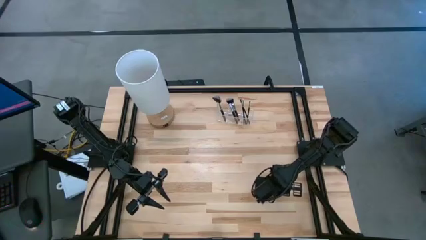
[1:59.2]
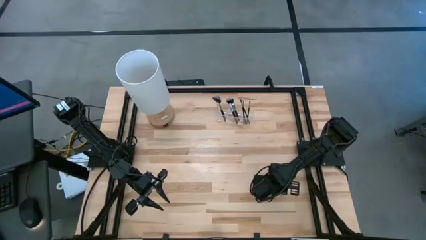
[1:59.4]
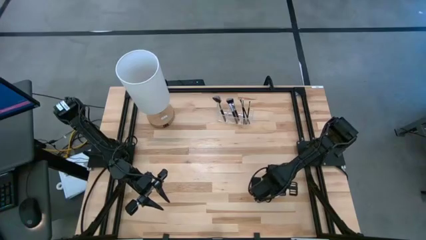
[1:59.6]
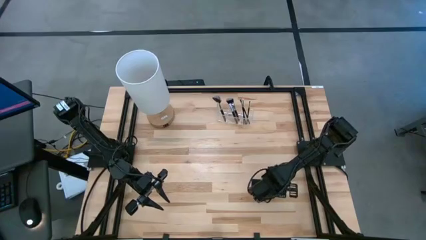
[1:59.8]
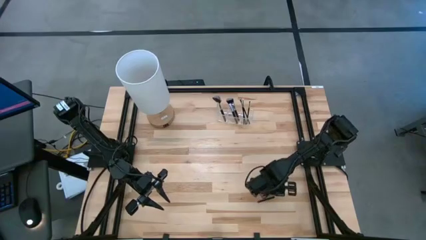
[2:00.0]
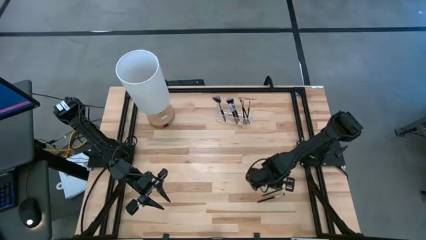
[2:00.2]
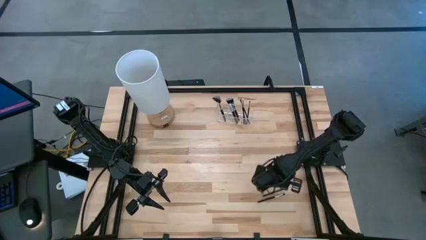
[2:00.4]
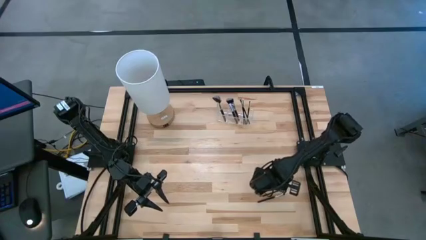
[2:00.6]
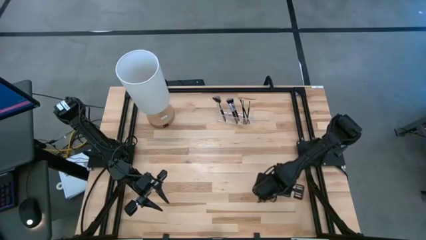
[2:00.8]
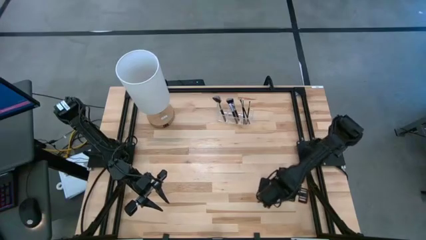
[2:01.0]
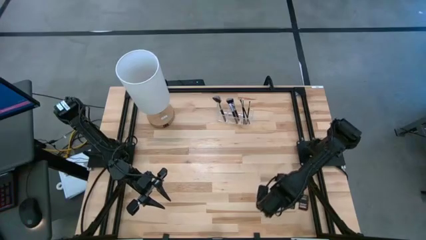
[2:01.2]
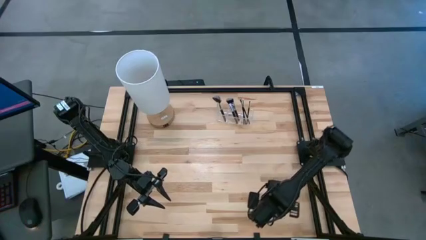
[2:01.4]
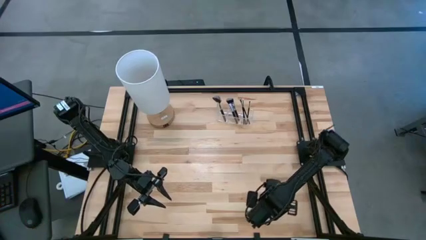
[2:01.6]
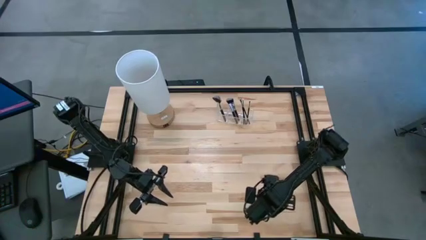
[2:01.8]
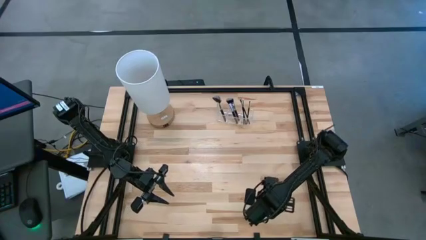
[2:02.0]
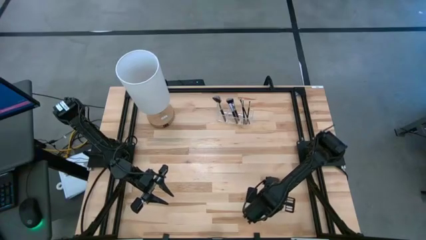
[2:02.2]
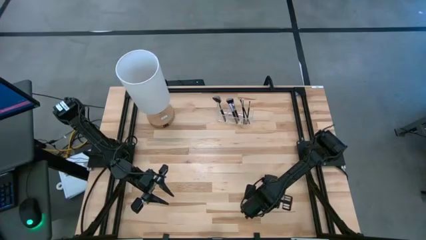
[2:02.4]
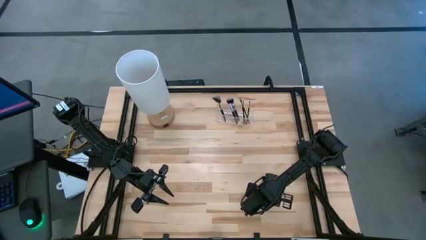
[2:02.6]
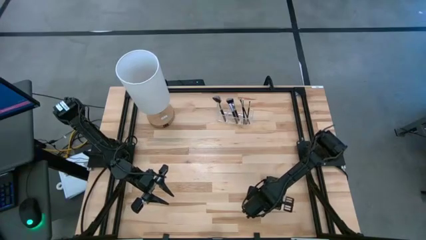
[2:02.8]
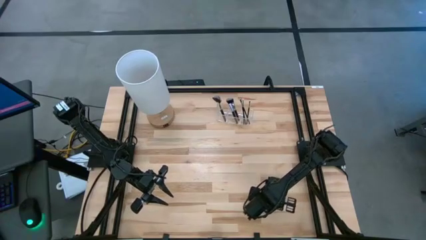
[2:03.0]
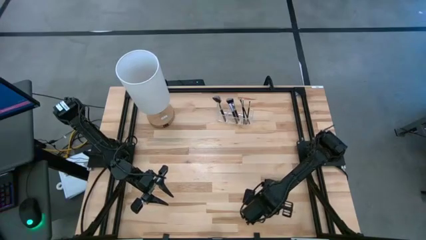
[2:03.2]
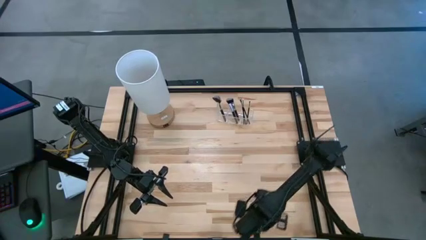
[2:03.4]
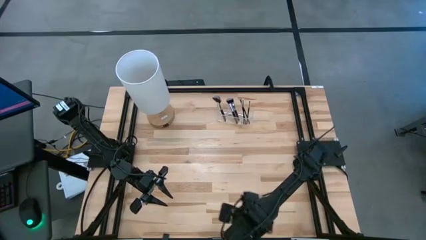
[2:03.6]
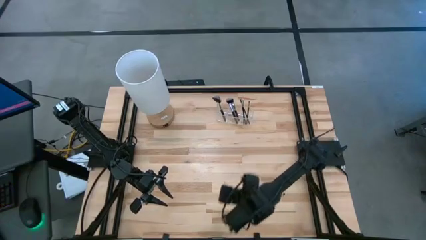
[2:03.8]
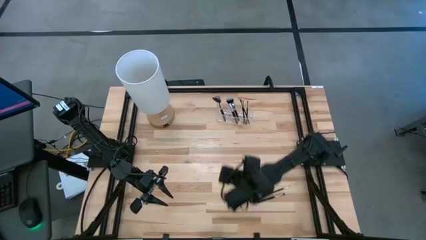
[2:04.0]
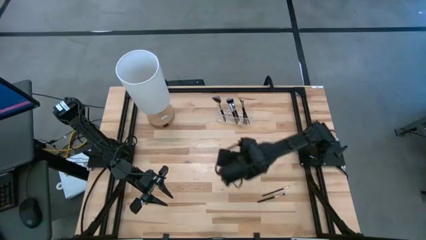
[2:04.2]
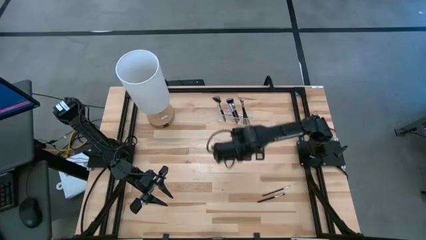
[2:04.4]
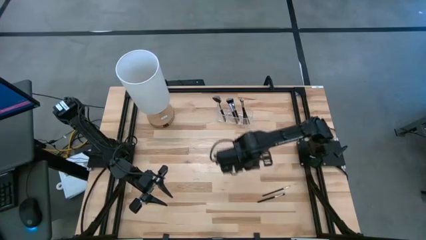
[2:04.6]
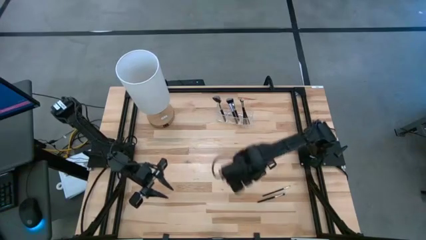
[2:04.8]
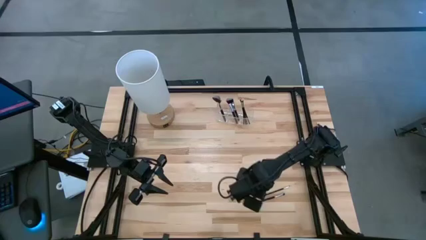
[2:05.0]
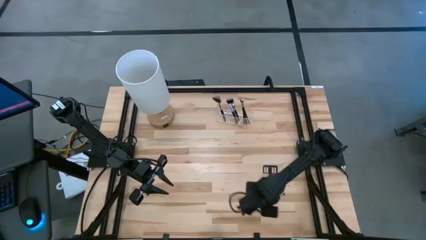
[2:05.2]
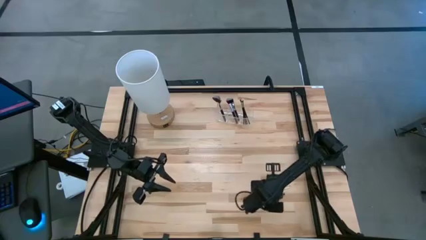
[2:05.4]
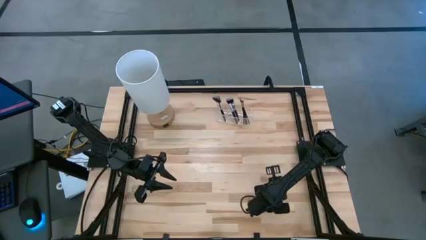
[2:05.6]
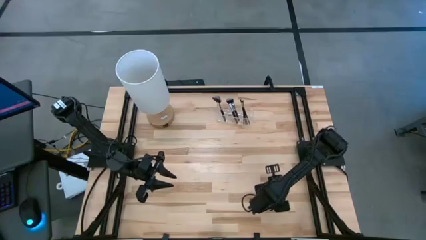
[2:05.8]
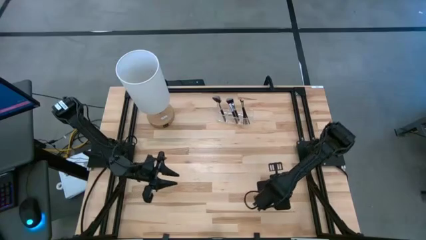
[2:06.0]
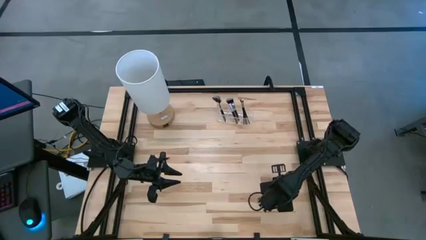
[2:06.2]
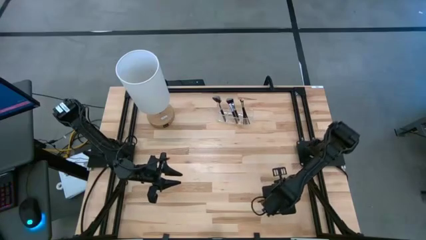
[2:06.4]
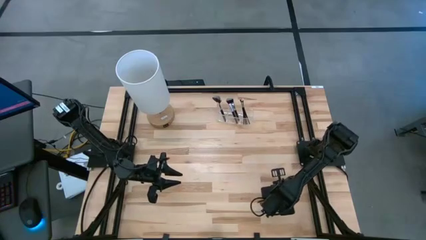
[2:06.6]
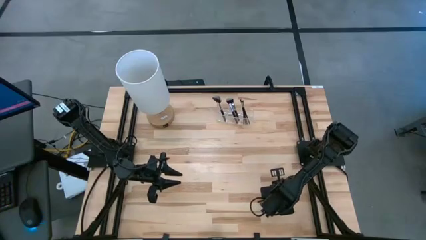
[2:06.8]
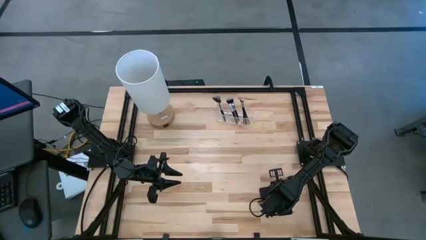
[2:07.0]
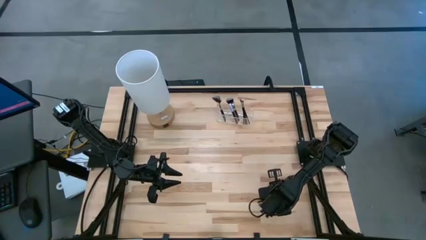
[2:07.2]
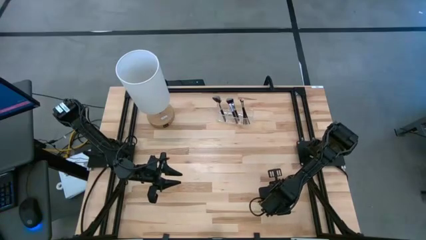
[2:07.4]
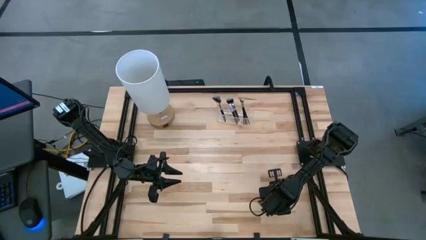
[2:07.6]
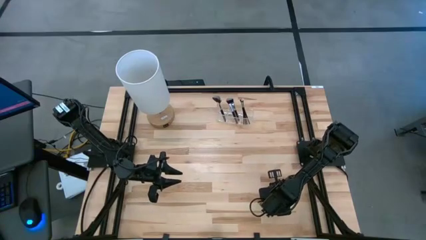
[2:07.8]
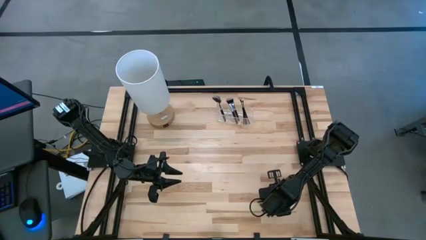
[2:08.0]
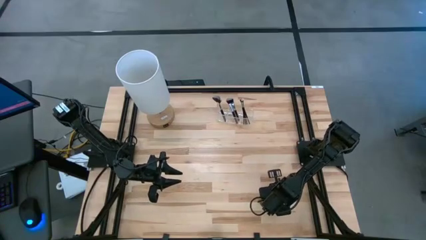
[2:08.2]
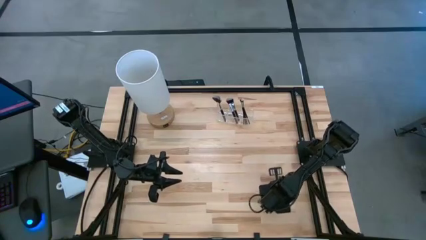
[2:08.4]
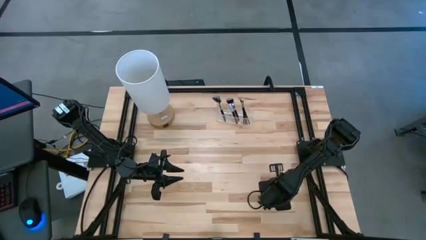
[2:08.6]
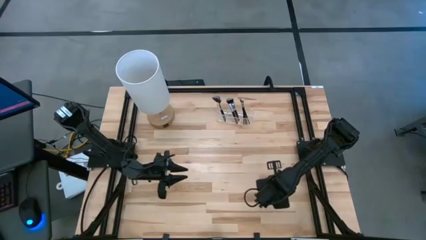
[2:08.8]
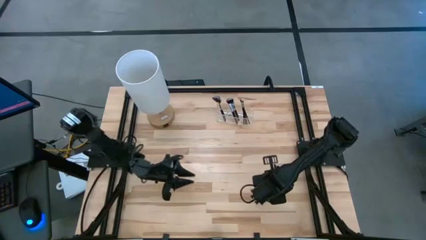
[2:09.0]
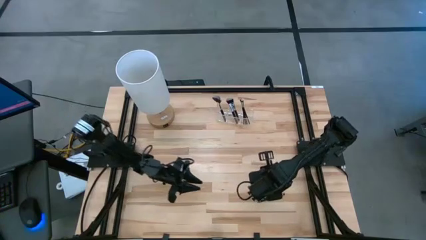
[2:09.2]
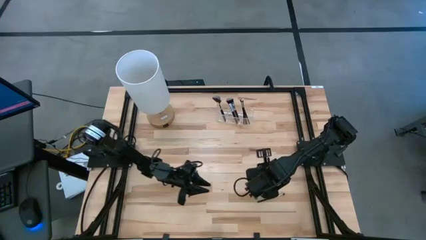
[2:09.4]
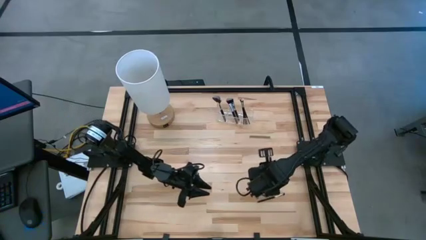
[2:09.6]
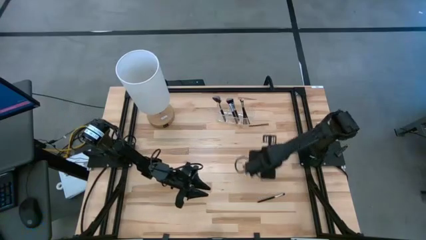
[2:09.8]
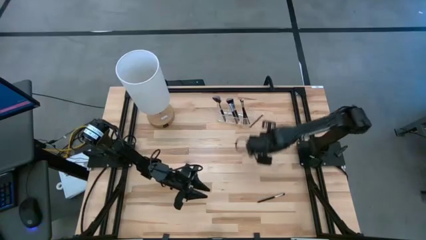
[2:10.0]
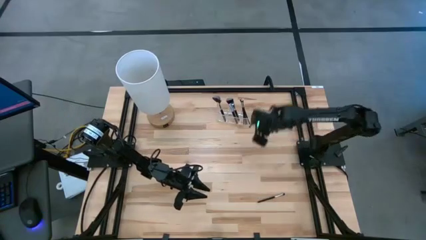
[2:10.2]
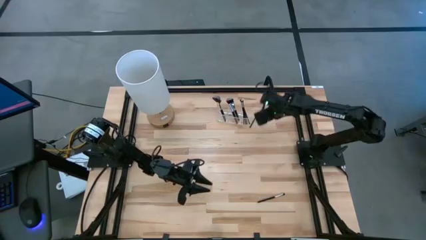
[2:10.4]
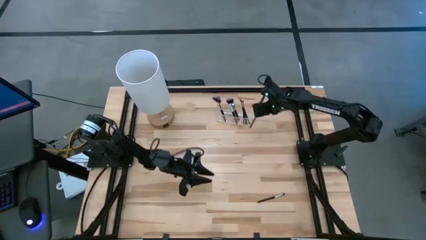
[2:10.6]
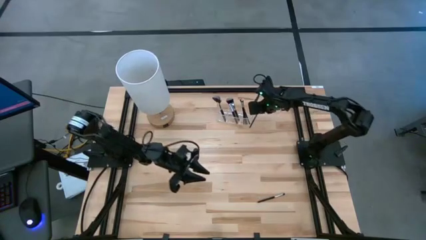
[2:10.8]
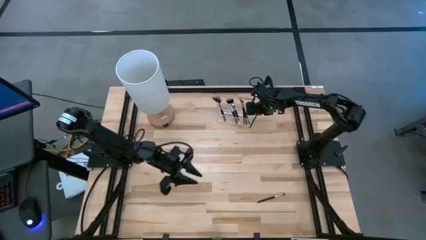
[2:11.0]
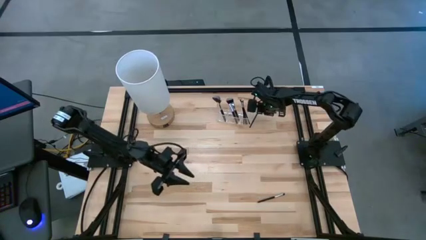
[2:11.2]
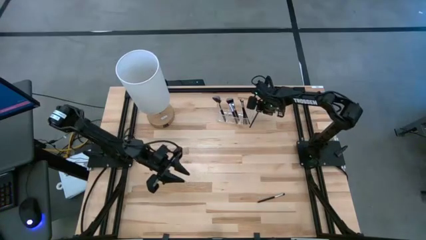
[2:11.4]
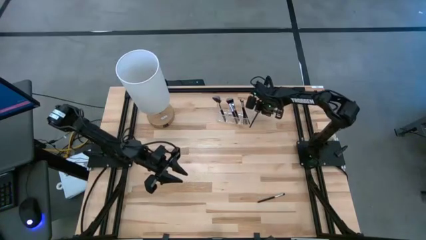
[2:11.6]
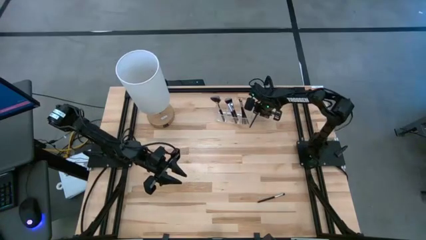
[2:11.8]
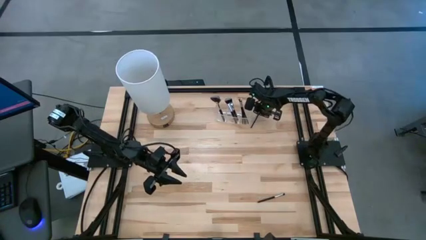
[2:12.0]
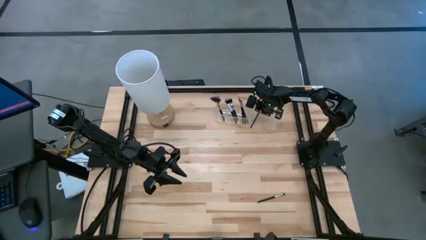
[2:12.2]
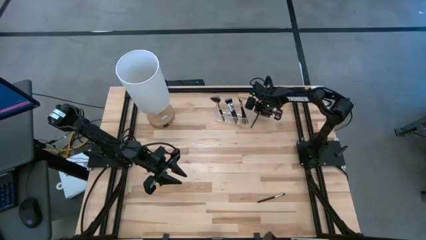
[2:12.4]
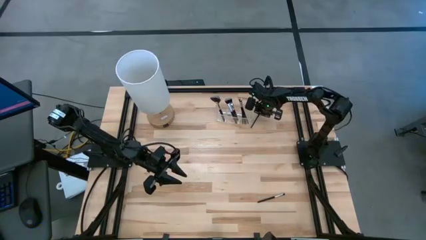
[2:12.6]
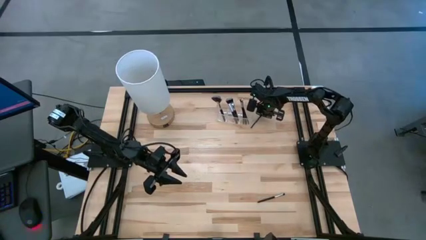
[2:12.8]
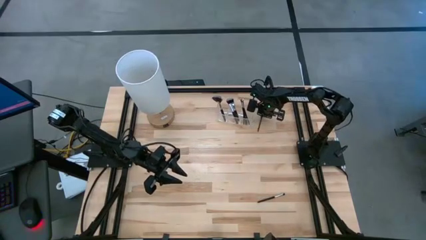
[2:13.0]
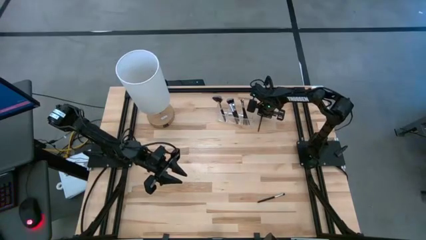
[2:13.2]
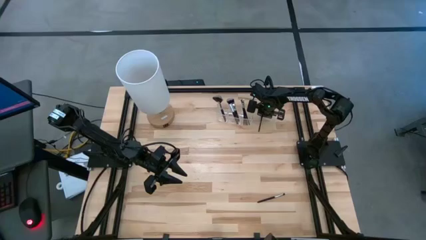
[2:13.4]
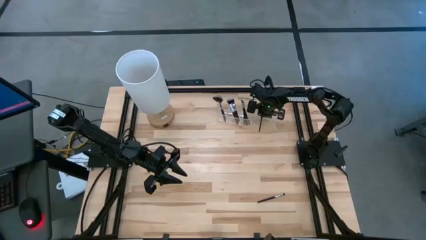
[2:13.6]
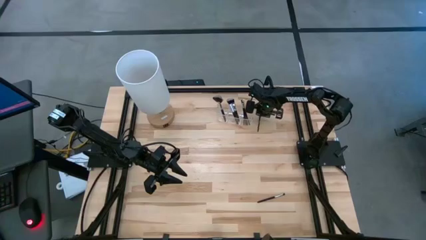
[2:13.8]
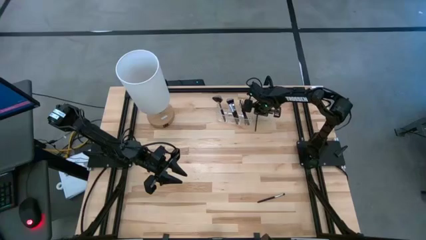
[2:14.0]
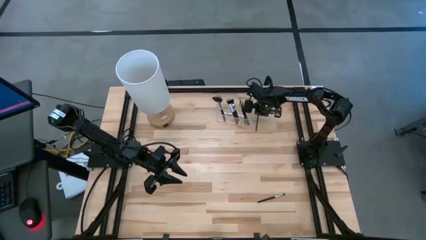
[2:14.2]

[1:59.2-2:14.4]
Task: Put items in baskets/containers
Put the black liner brush into the transparent organizer
